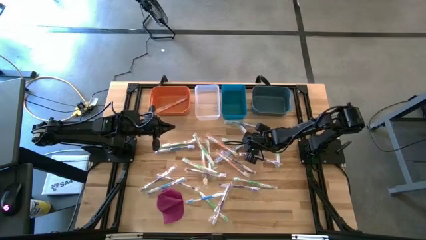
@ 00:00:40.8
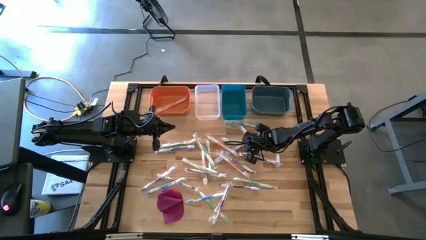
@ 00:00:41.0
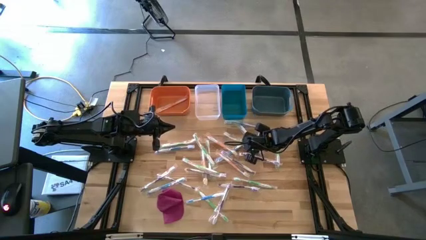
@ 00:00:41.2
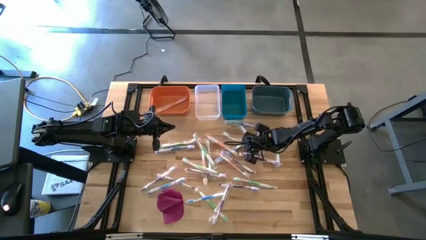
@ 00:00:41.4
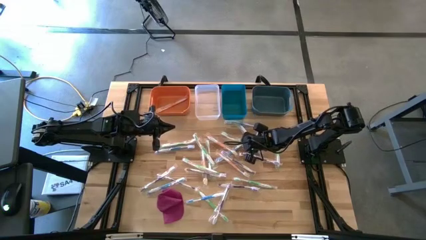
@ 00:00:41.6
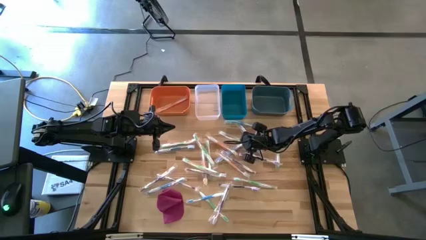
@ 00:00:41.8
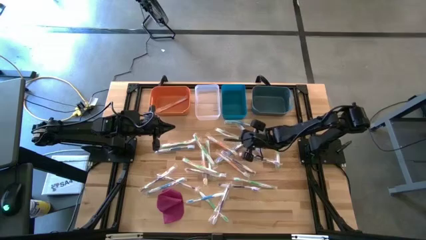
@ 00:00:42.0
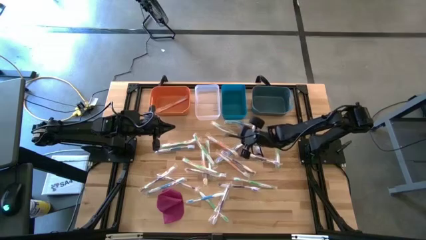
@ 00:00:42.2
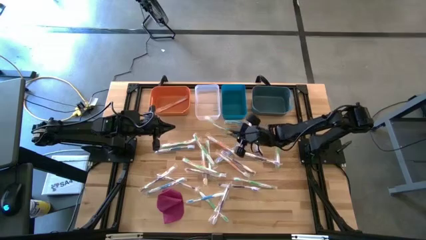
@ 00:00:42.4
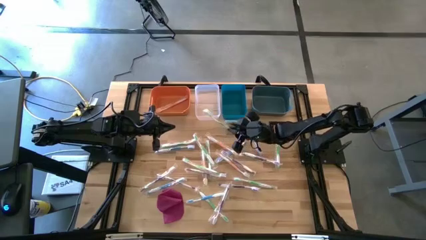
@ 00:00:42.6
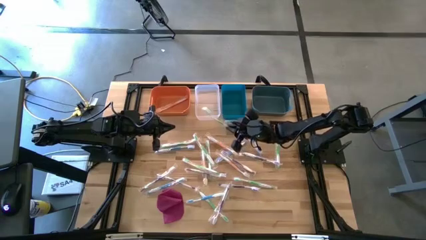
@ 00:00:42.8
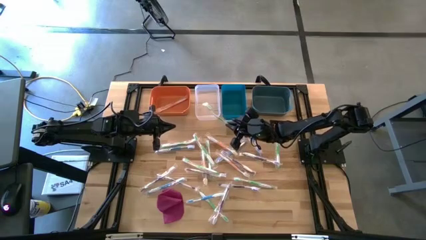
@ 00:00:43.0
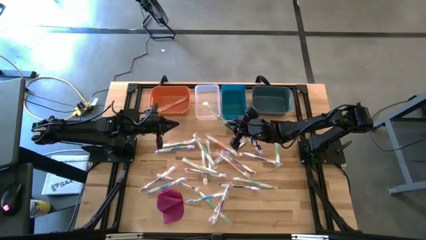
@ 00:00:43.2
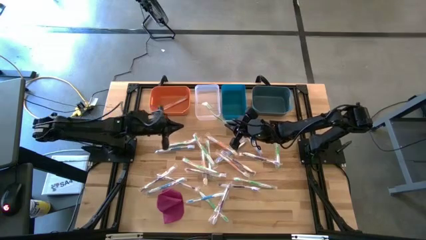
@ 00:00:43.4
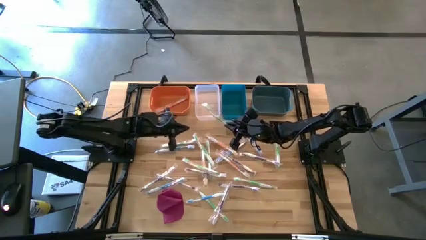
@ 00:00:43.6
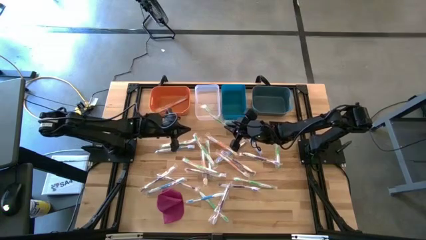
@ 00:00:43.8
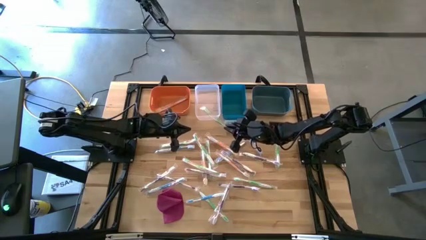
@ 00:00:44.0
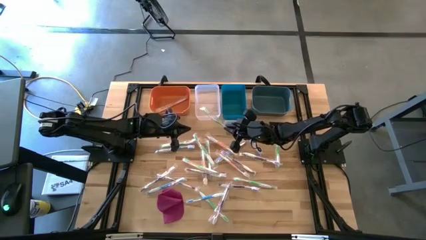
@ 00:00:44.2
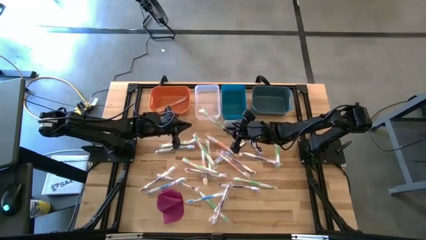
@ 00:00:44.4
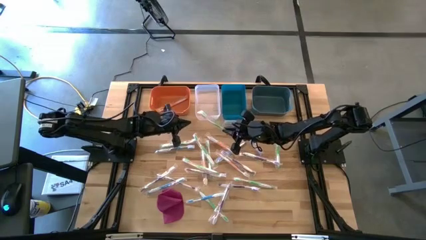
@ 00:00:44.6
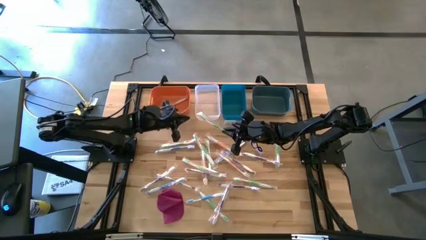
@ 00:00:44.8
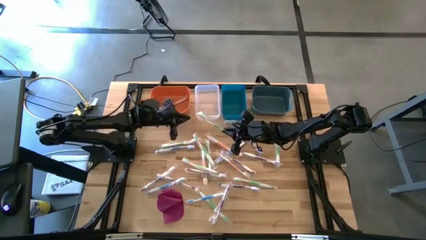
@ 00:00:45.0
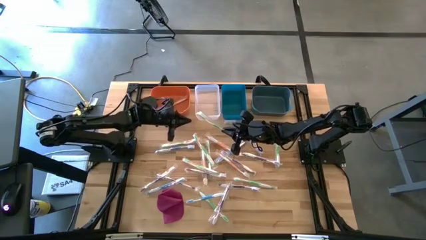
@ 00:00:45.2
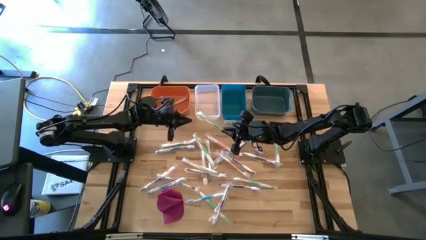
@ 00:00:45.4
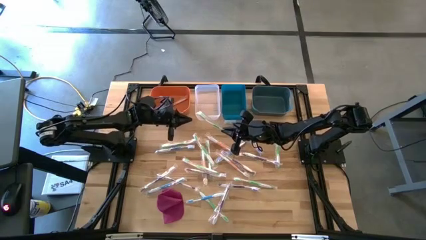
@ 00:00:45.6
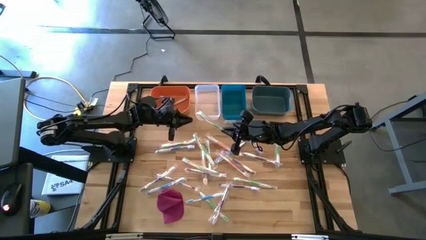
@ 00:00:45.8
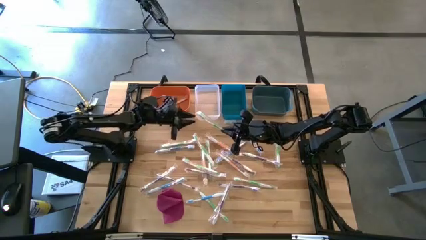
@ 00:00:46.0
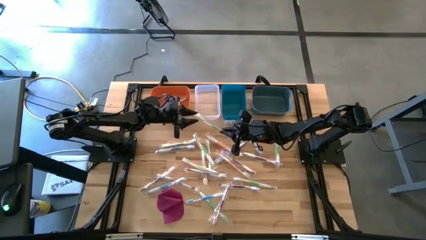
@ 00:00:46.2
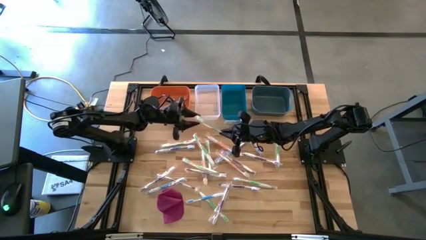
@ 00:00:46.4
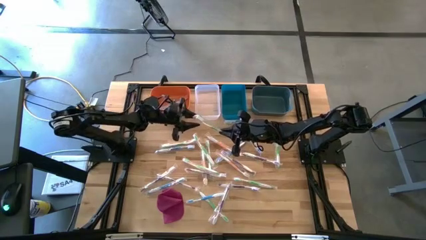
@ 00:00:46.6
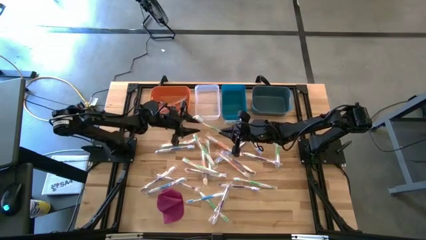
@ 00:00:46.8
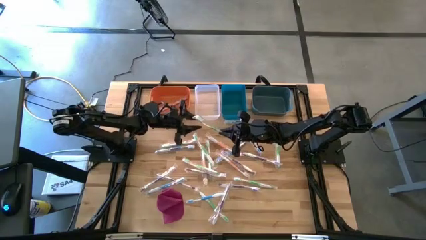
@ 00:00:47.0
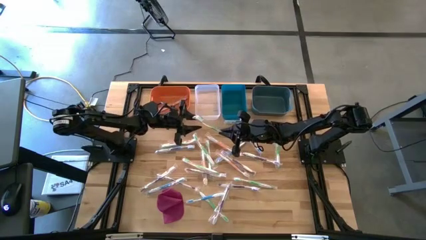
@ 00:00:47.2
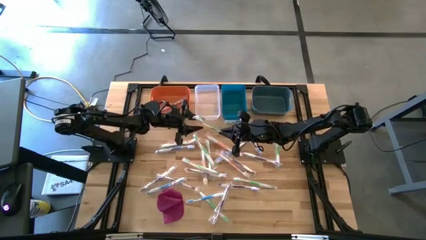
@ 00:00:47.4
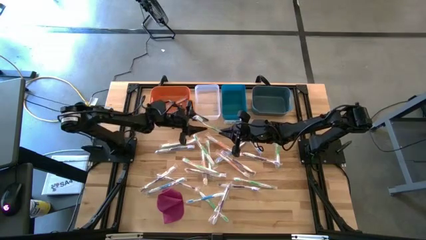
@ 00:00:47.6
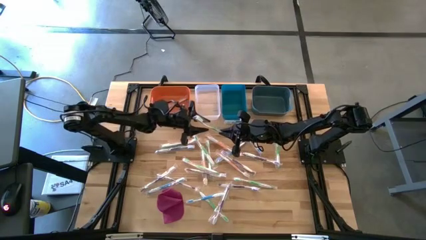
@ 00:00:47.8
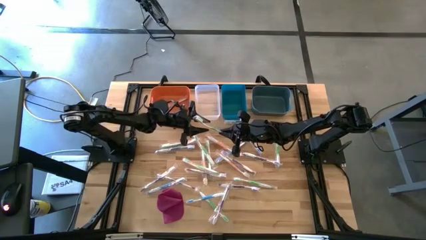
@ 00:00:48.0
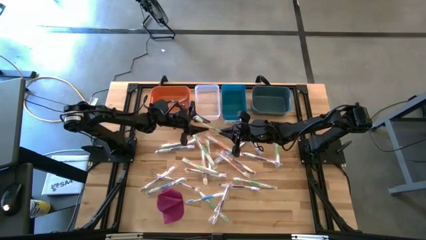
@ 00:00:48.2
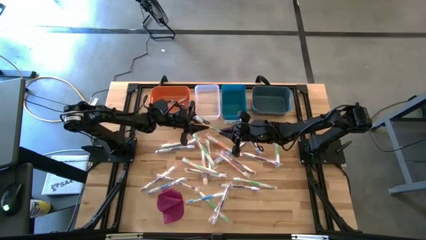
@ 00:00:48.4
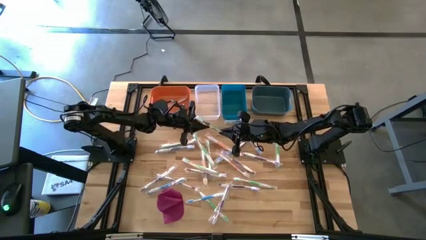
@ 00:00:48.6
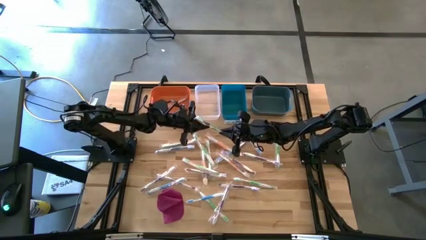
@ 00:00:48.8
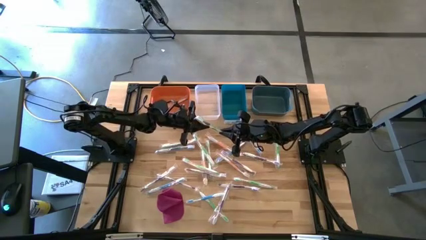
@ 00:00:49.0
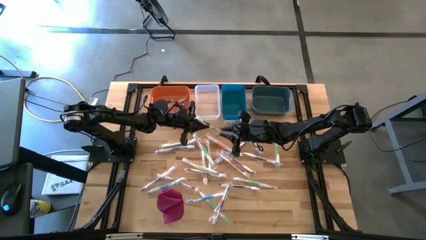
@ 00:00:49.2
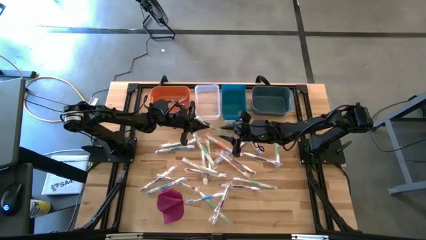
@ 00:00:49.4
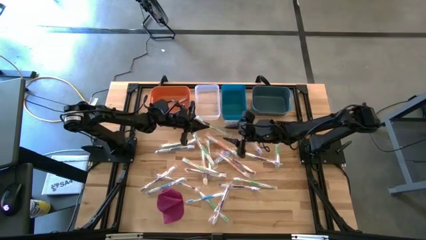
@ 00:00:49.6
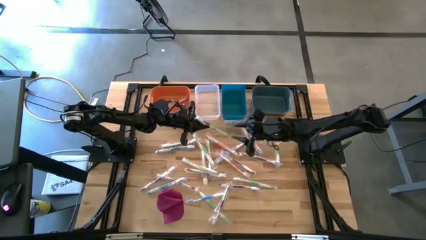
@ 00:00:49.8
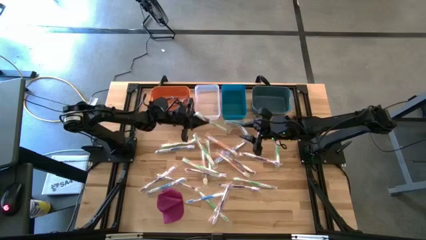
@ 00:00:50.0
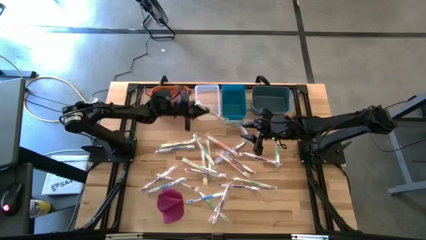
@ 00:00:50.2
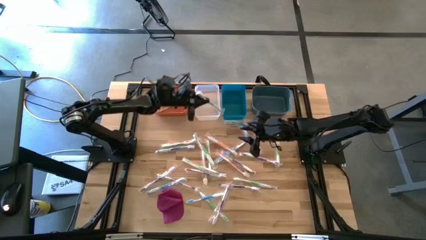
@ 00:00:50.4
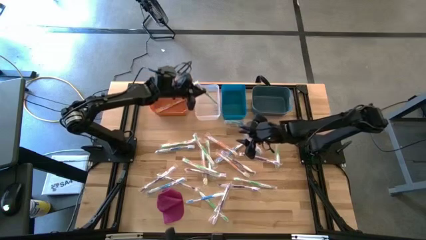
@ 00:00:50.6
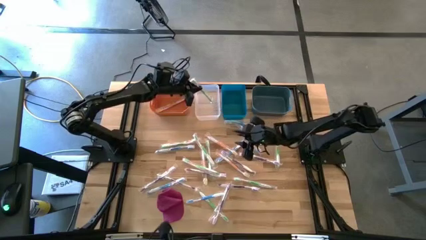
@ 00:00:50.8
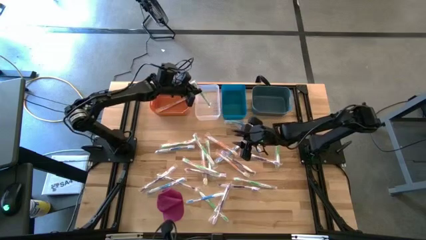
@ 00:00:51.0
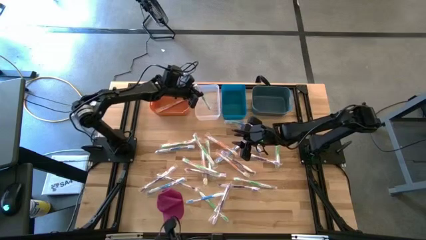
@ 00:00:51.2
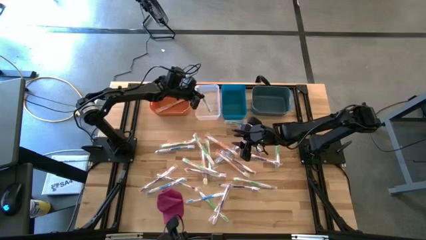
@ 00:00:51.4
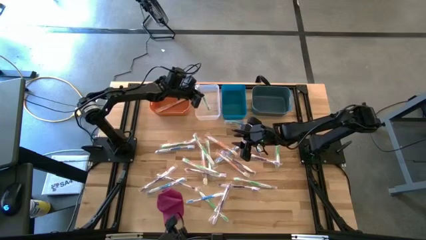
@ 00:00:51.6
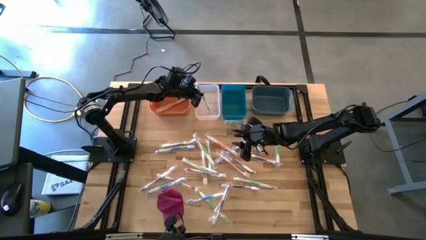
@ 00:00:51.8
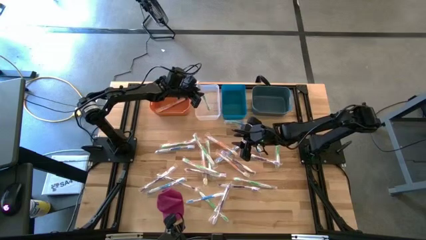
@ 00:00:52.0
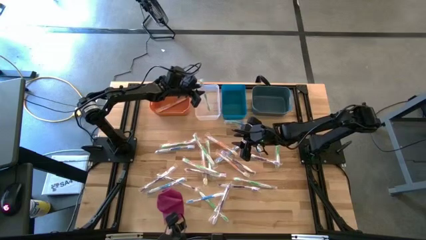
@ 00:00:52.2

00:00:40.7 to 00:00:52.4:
Task: Pick & Place Toothbrushes
Put the green toothbrush into the transparent bin
